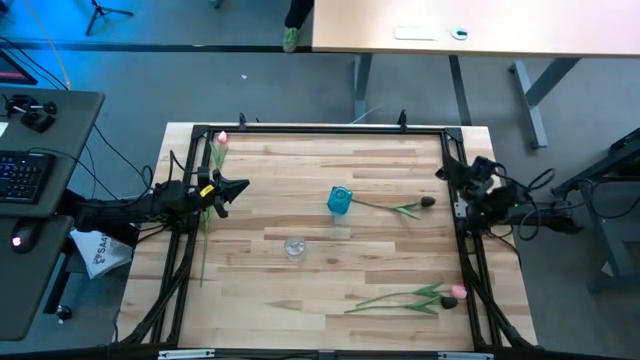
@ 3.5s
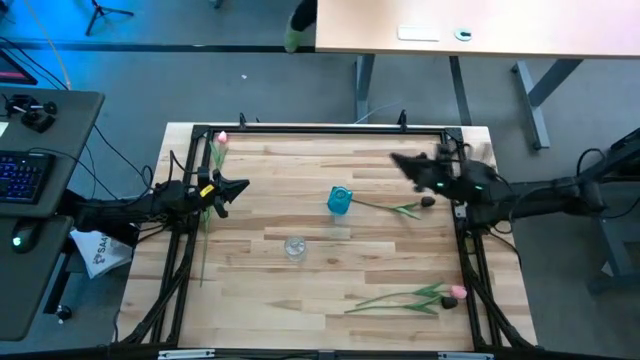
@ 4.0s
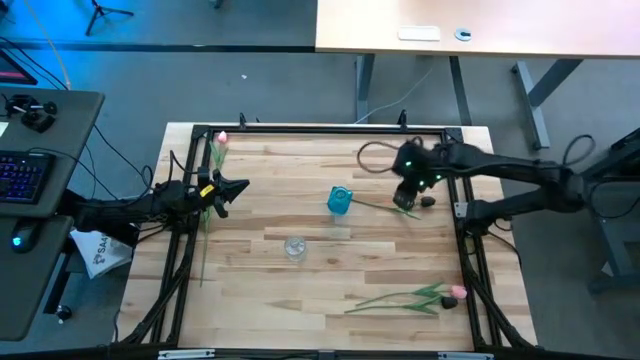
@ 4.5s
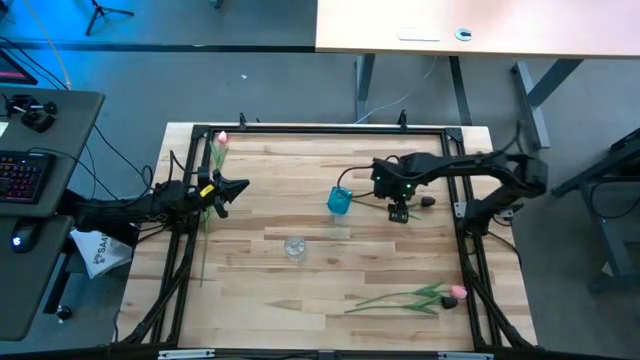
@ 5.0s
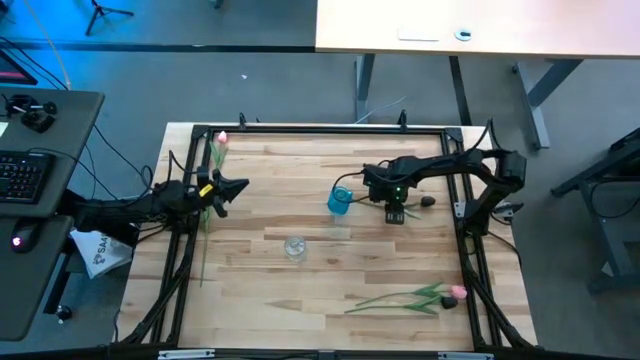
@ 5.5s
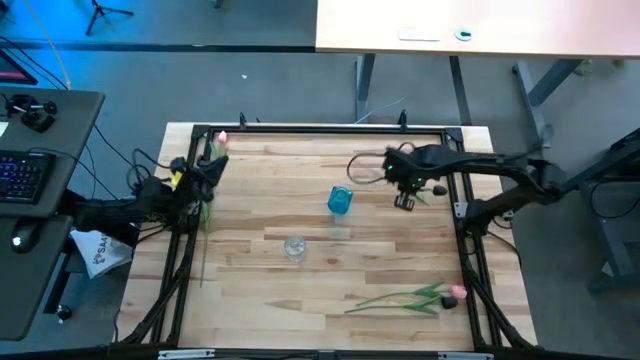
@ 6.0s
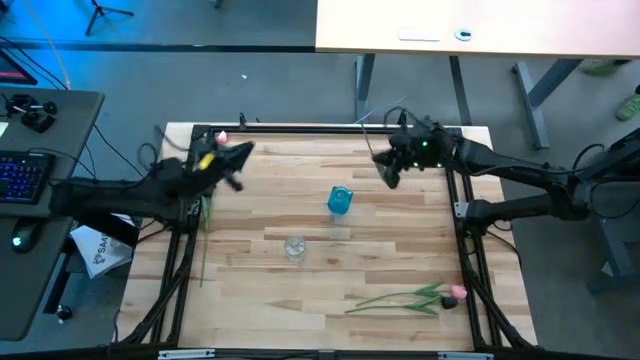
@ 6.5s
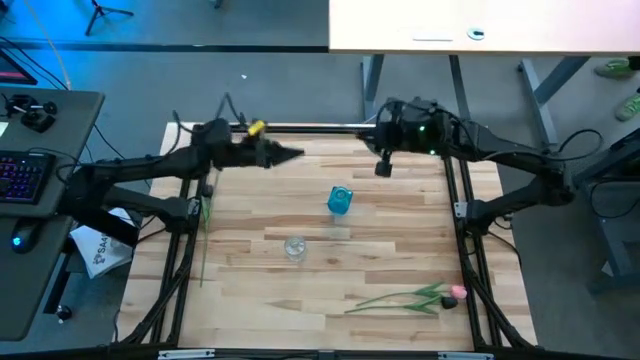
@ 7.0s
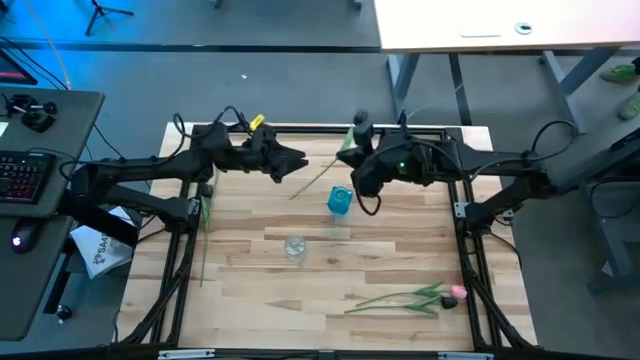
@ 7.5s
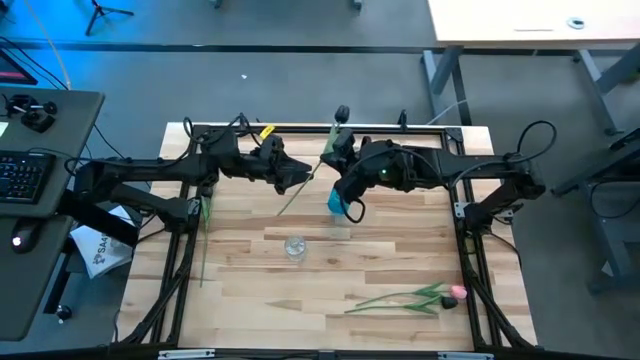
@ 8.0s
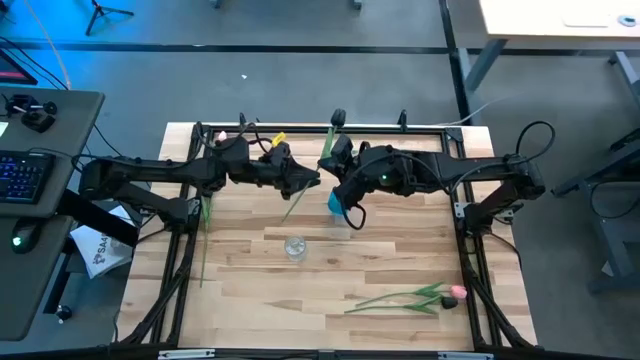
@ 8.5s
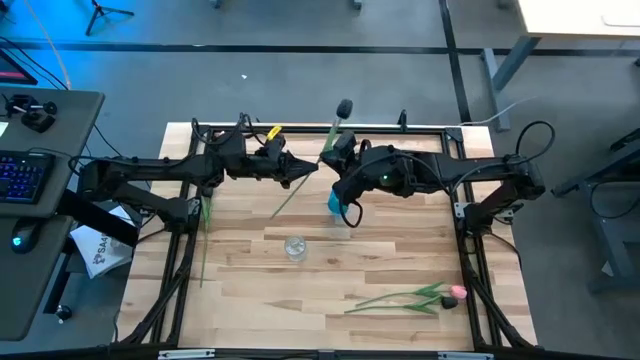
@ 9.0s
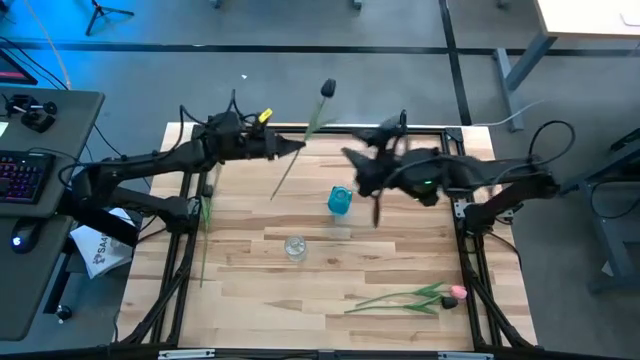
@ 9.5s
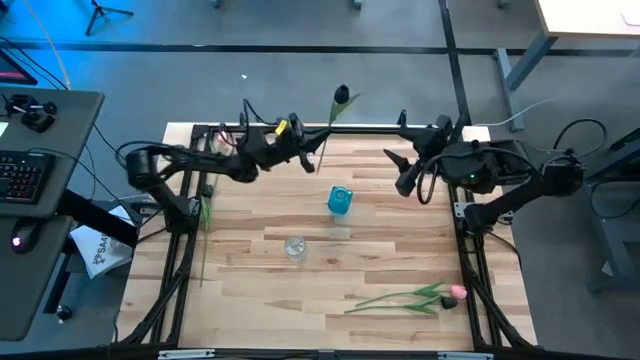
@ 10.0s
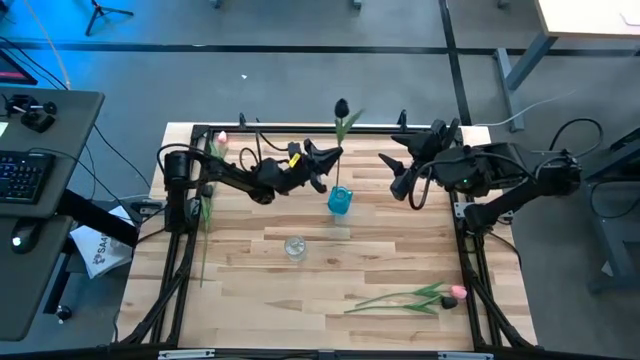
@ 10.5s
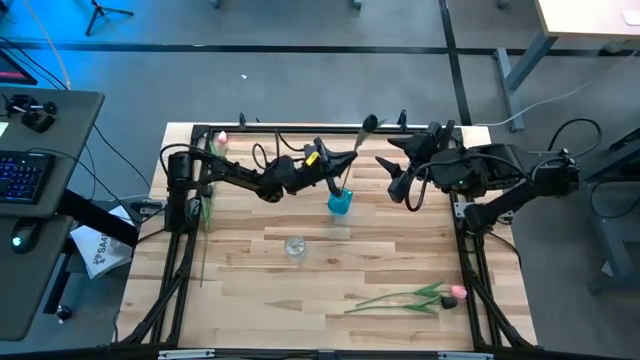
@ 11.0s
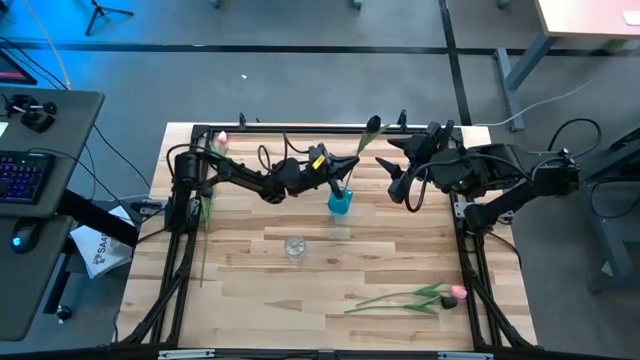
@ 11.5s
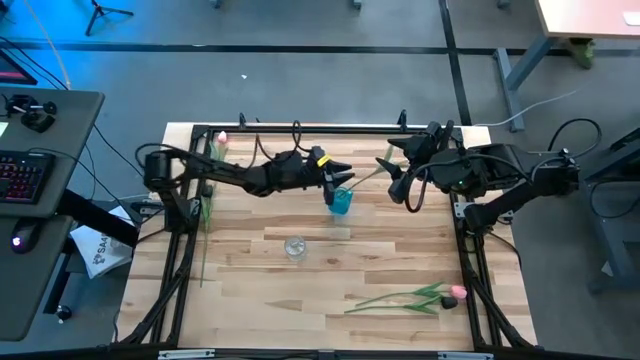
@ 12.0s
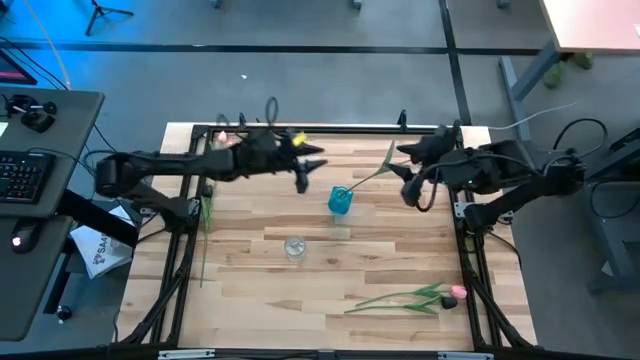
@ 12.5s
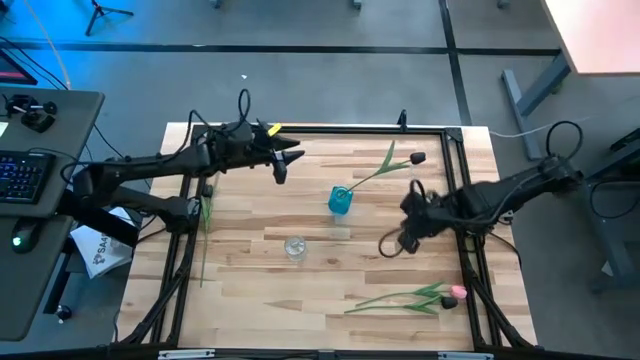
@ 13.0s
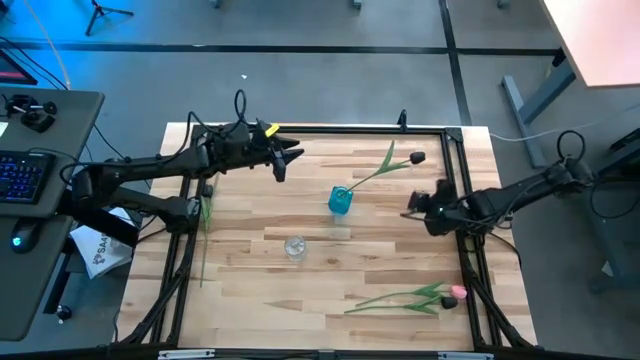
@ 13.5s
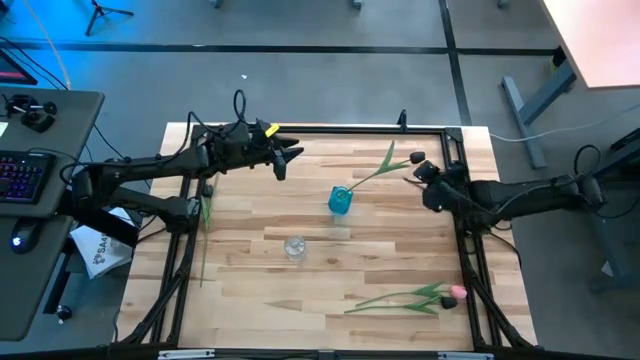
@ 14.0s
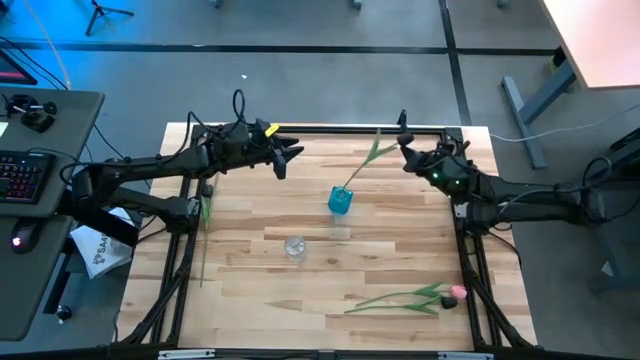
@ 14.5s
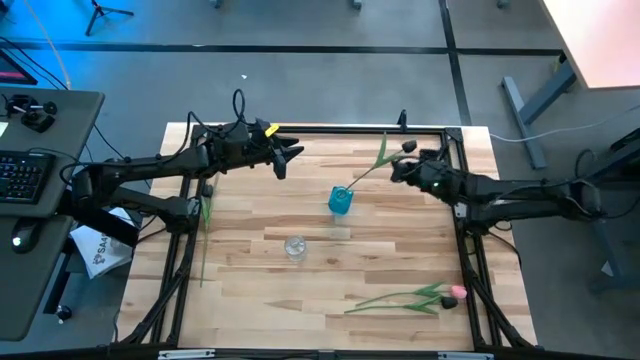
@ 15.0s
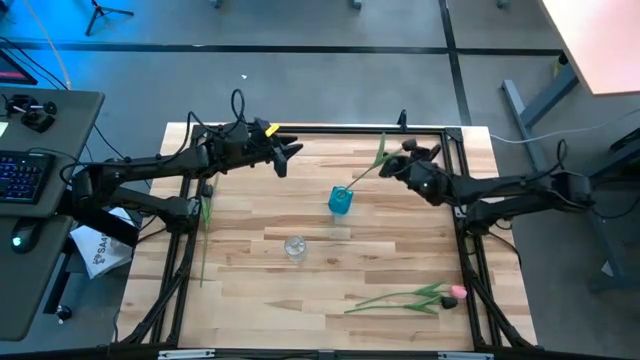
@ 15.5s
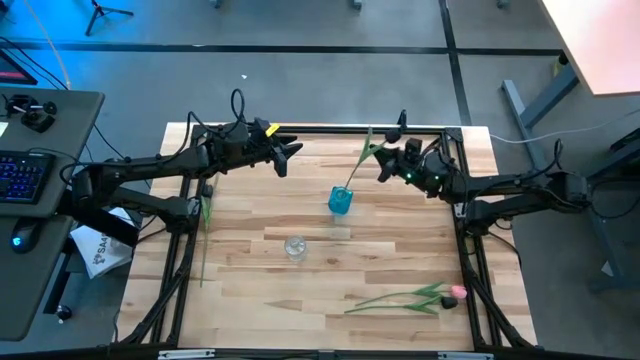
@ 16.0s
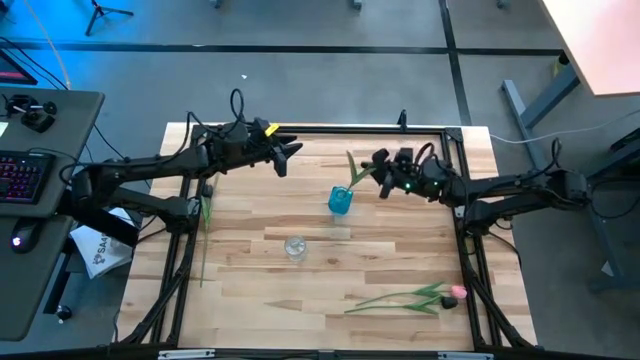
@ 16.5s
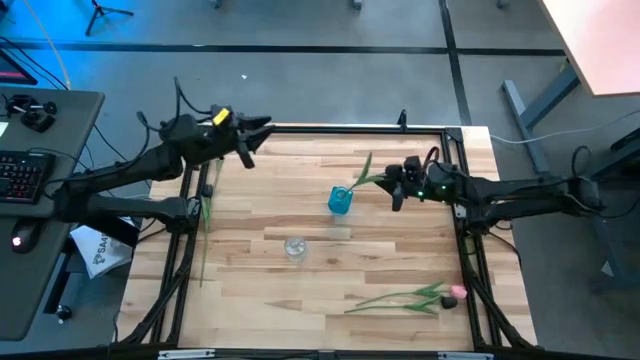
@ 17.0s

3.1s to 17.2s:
Task: Sort flowers into vase by color
Put the right black tulip into the blue vase

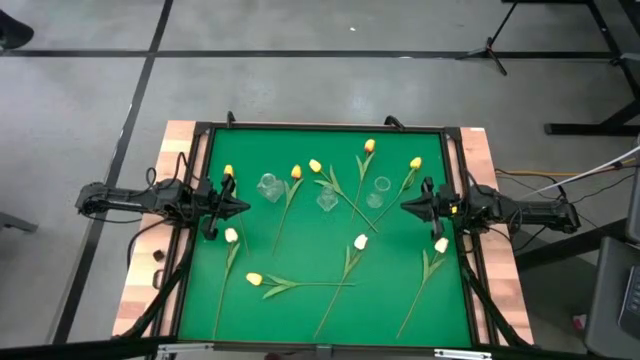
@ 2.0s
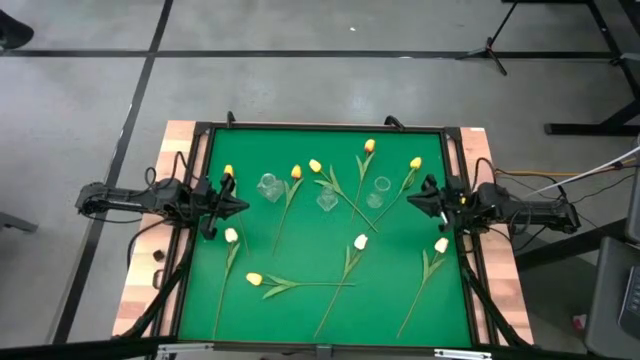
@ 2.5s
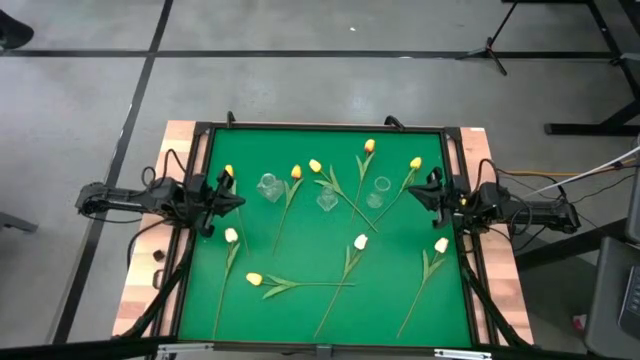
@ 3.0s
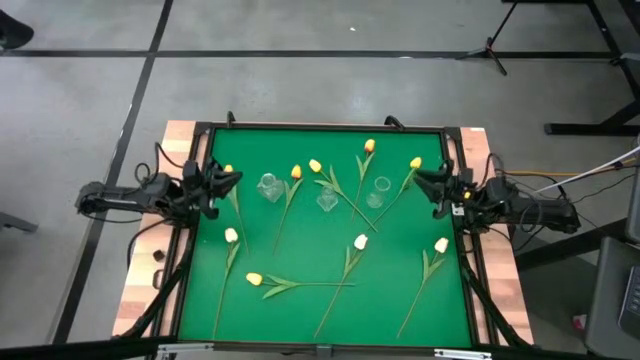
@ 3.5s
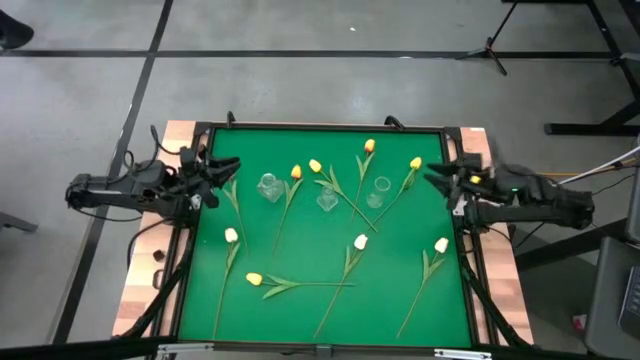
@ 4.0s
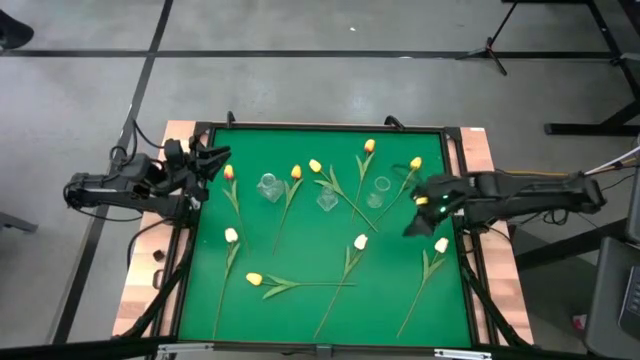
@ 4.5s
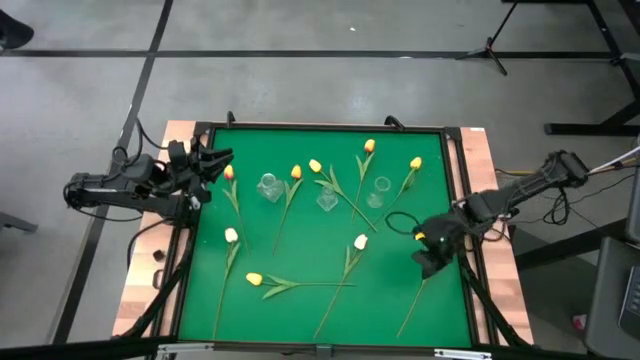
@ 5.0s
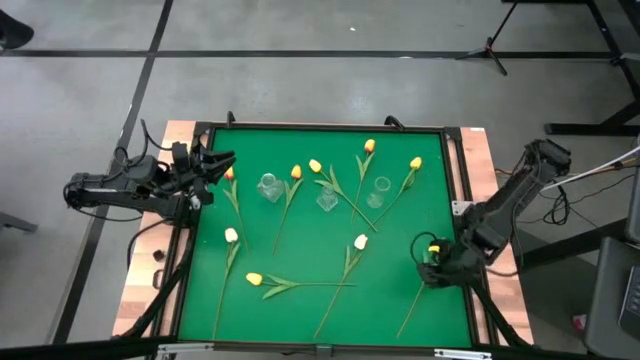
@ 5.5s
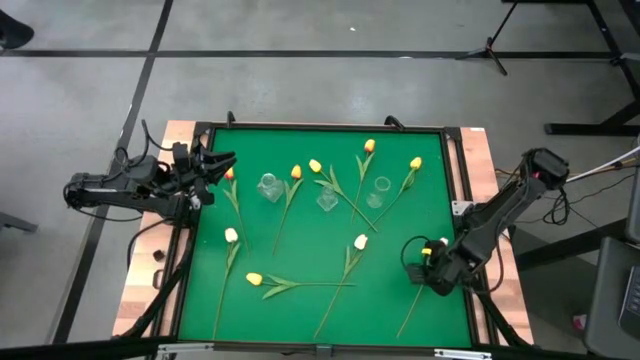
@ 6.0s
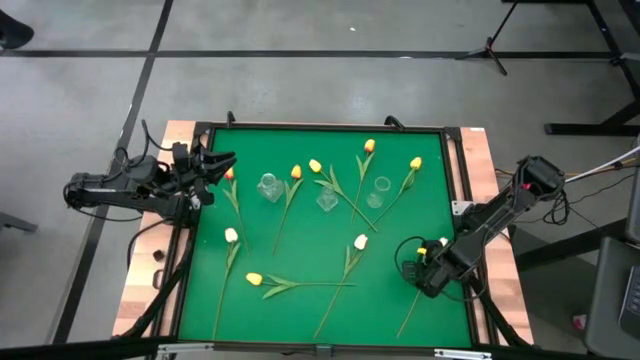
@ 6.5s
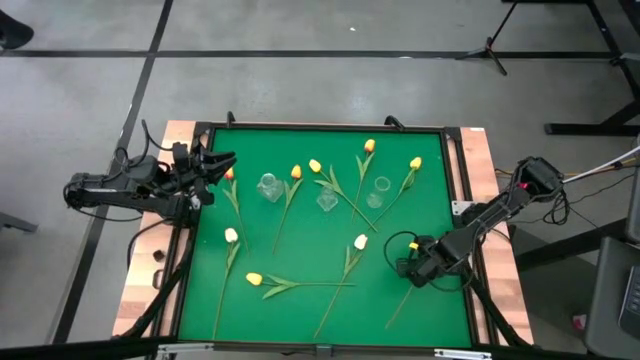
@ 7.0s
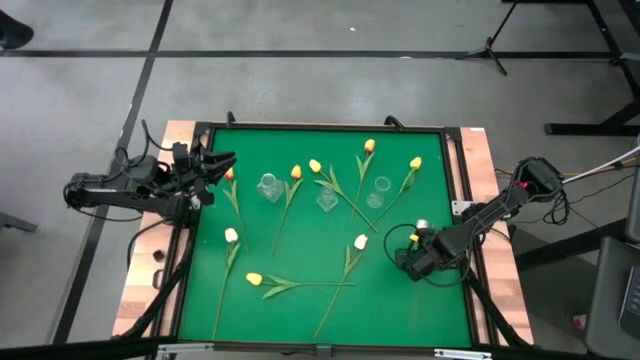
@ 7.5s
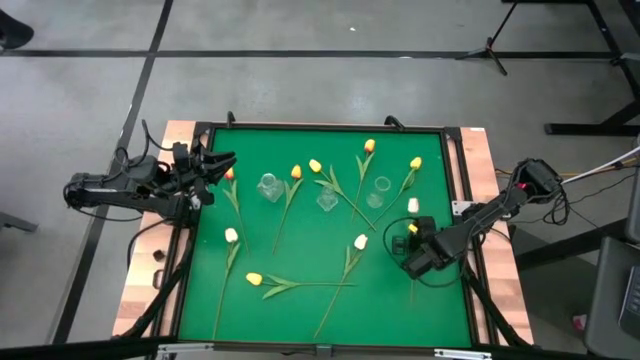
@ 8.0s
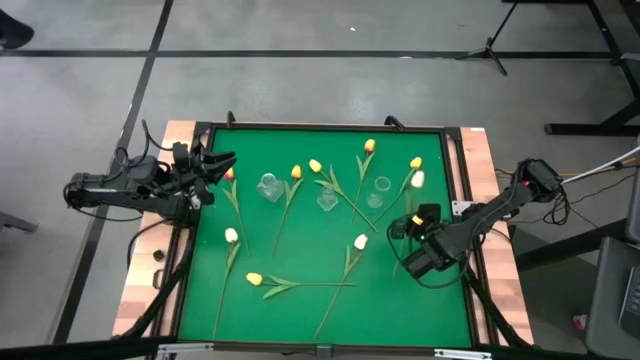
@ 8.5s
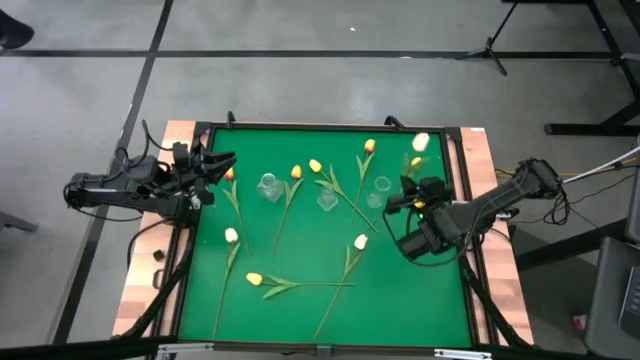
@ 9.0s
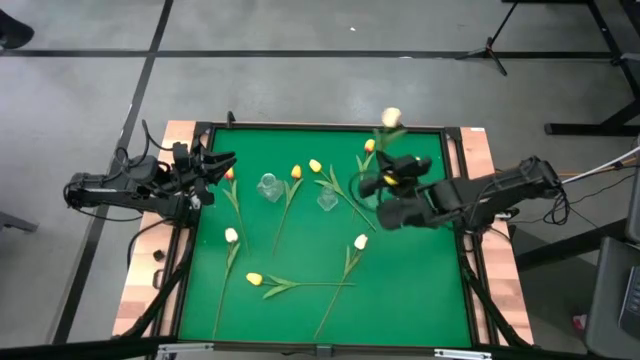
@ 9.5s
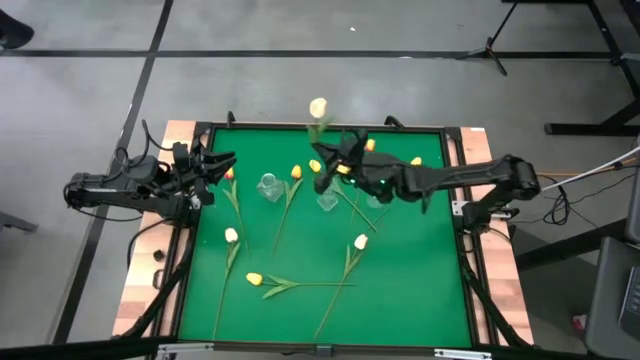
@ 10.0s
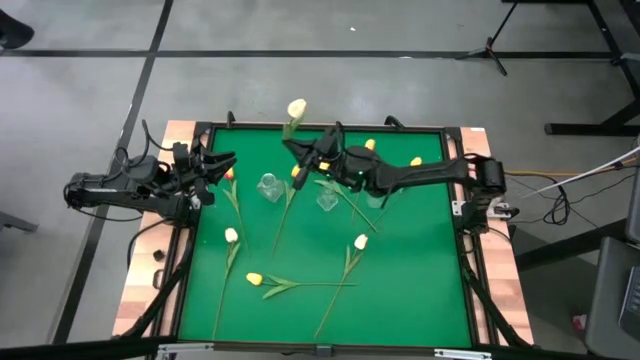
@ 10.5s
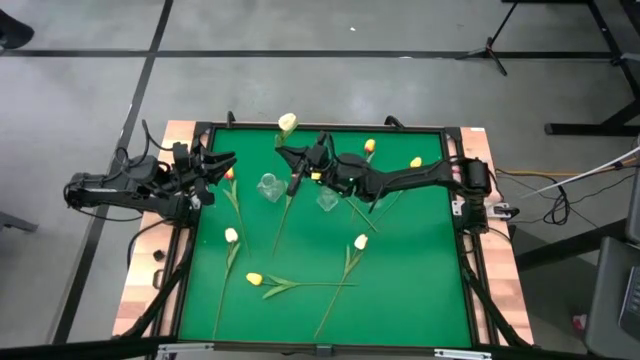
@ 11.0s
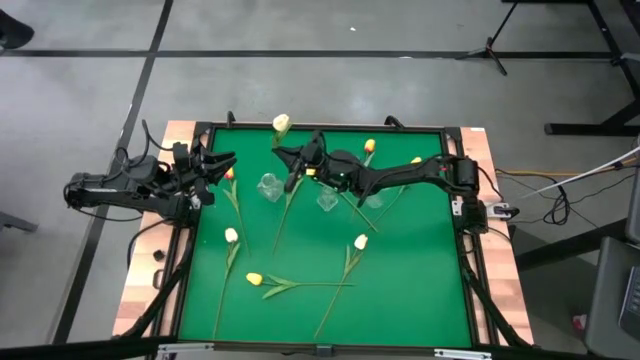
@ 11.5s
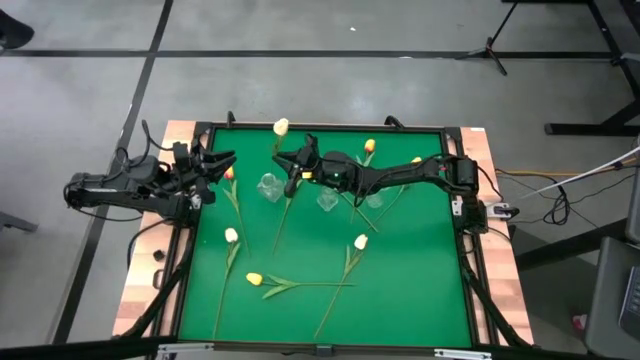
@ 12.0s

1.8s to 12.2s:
Task: Sort flowers into vase by color
Put the right light yellow flower into the left transparent vase
